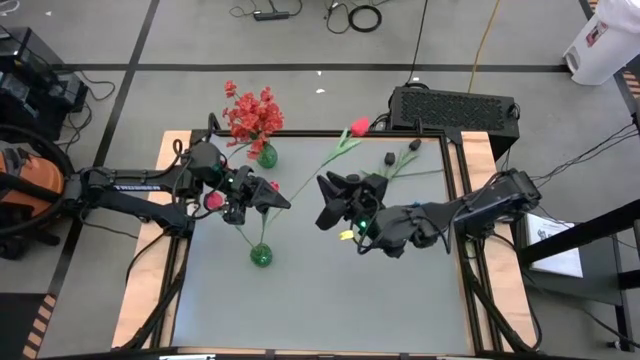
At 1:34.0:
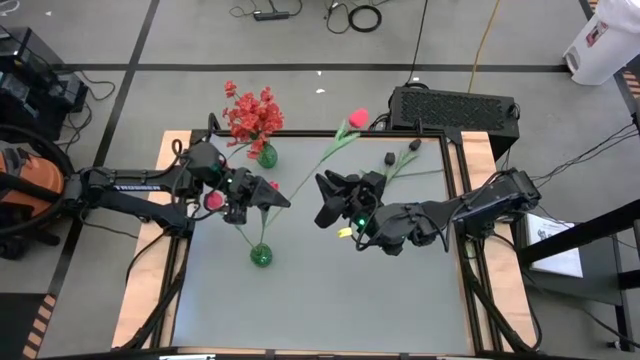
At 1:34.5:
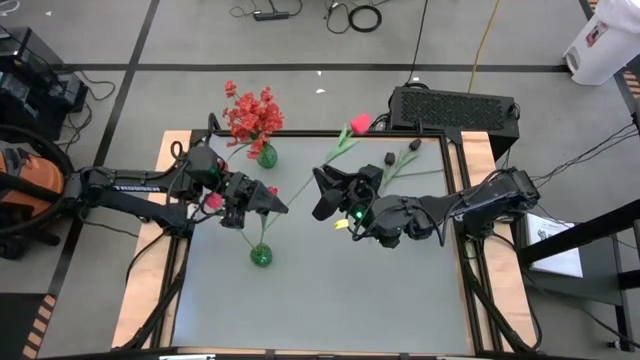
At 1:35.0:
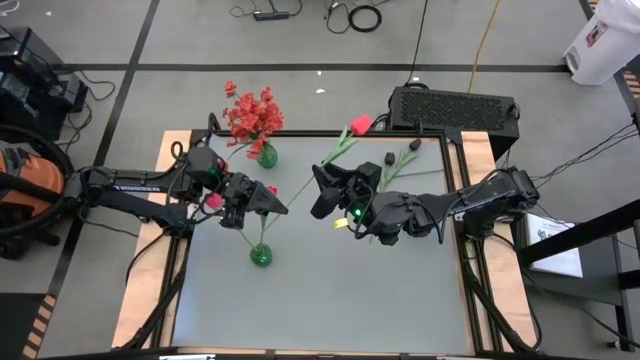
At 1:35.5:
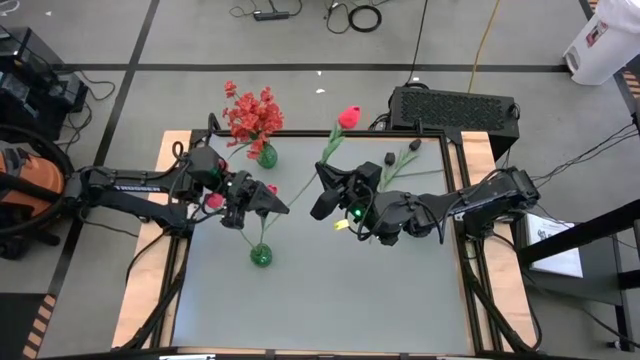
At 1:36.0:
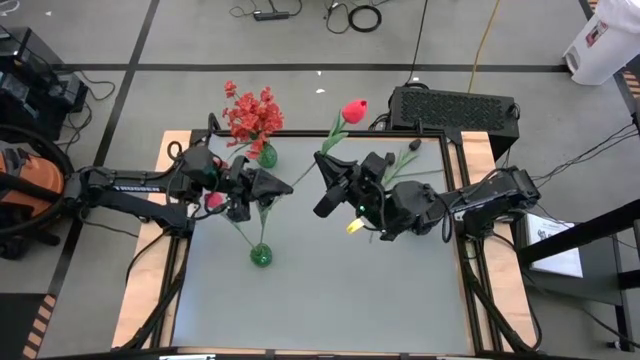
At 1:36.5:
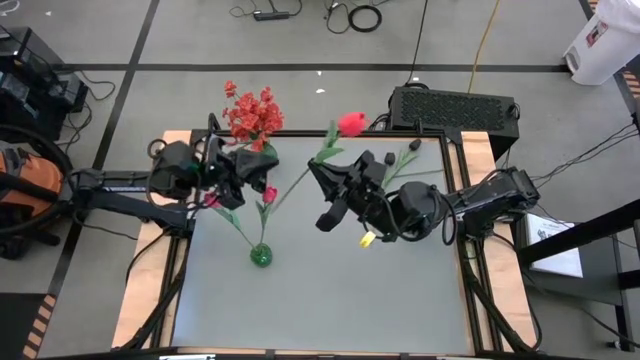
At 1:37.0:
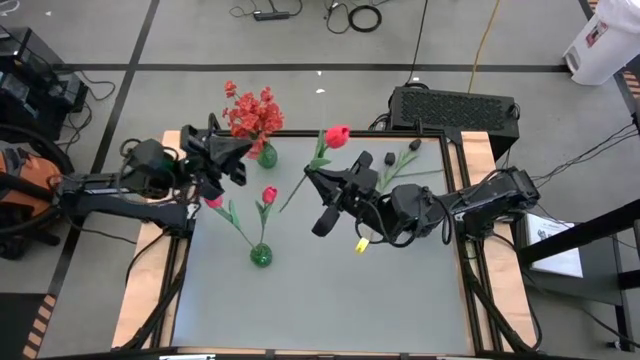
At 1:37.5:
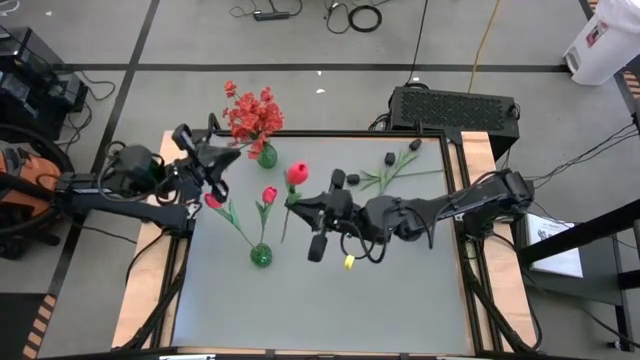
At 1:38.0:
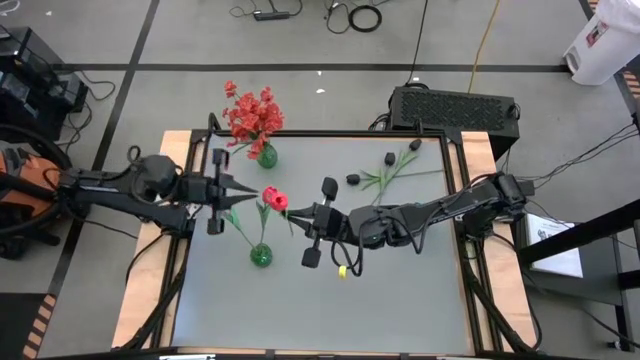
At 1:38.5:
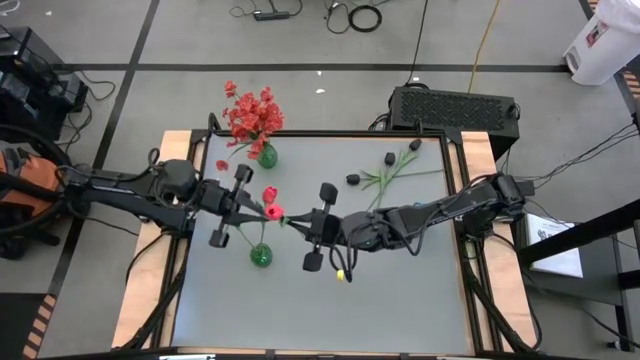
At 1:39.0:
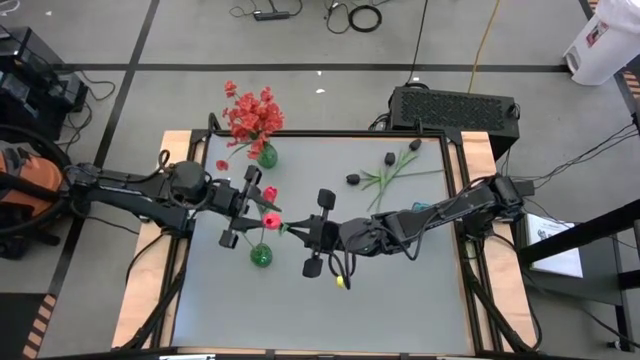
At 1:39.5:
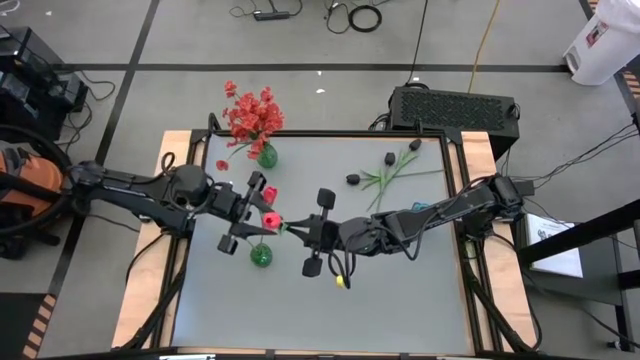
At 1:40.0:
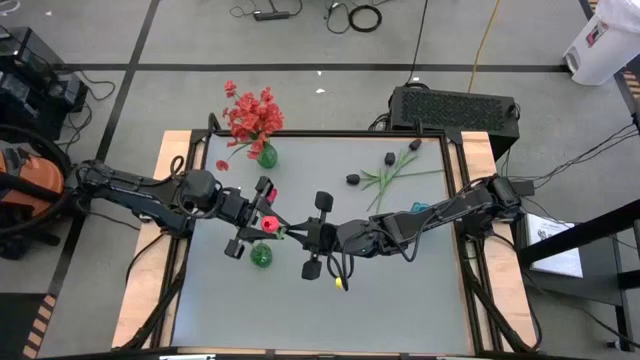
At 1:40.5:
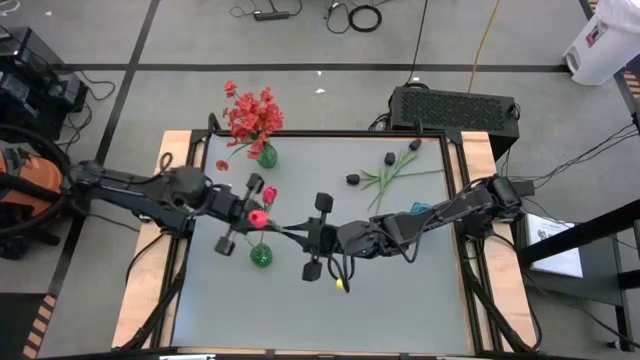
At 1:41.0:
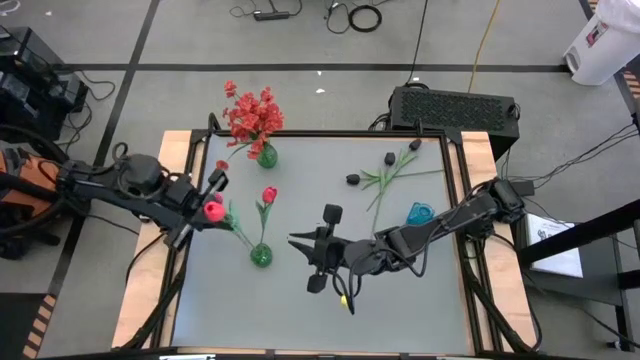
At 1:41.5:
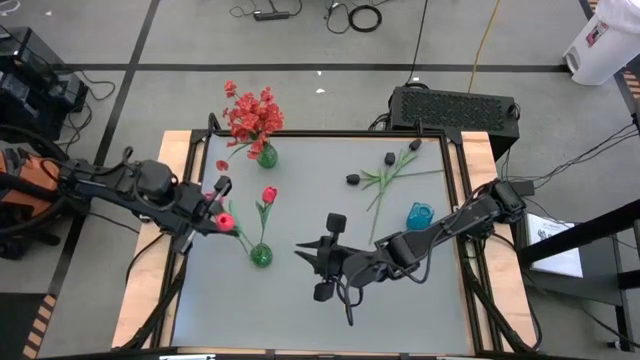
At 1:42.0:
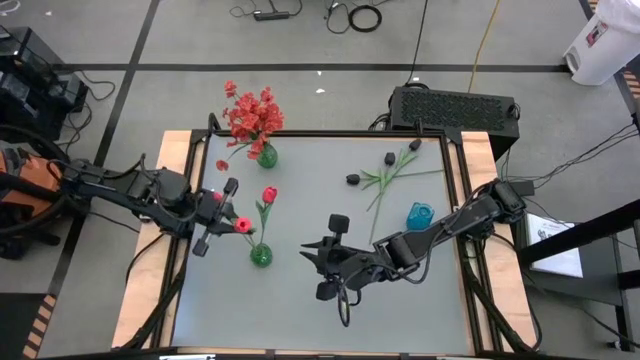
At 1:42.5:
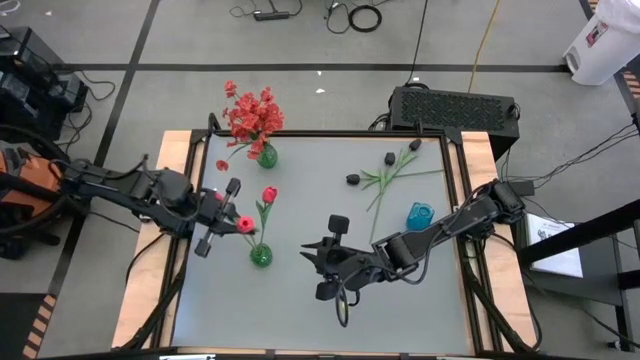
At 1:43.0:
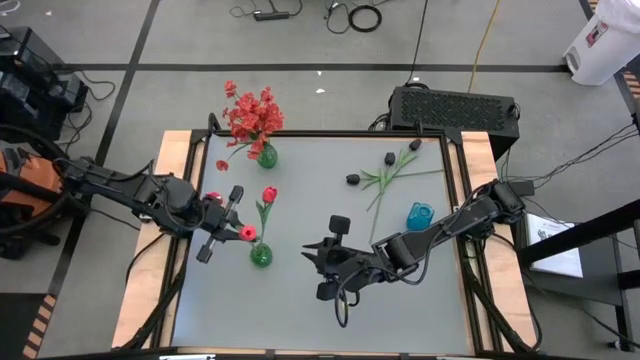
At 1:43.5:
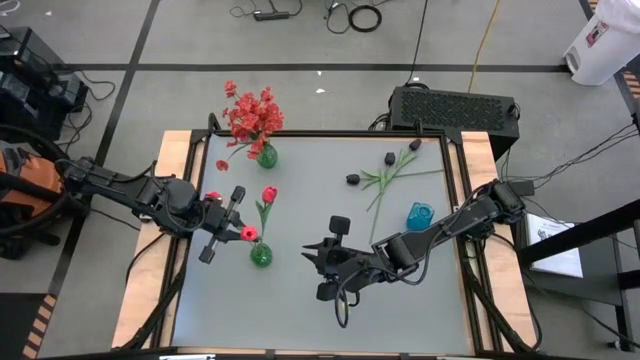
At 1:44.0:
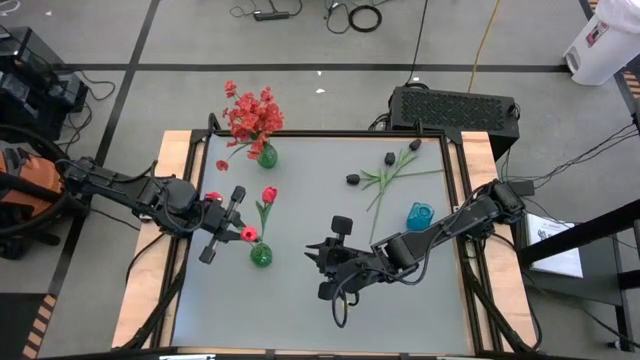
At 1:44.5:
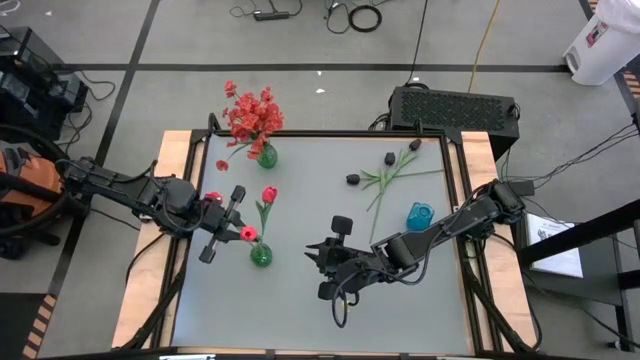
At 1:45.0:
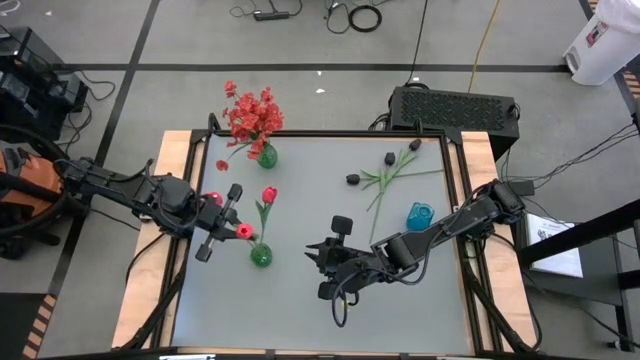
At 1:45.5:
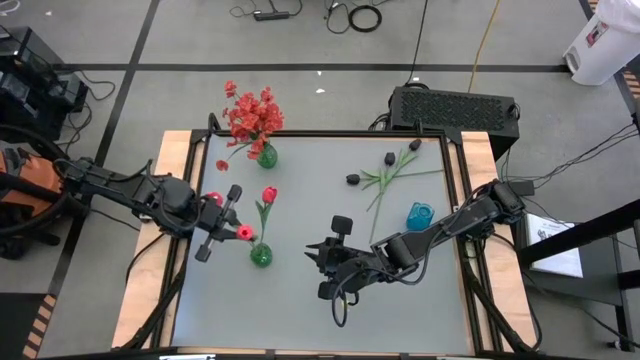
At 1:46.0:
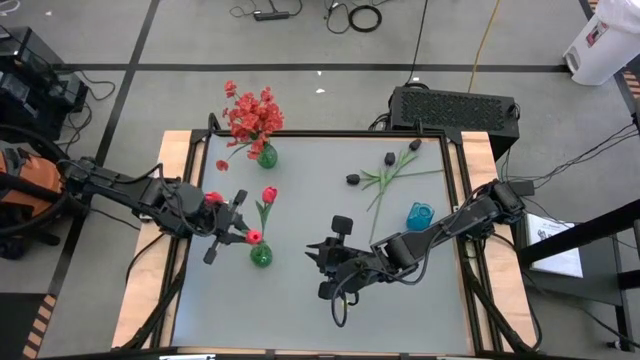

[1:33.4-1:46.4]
Task: Sort flowers into vase by color
Put the red flower into the bottom green vase

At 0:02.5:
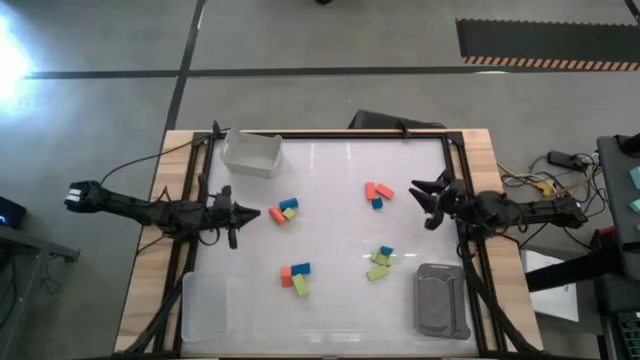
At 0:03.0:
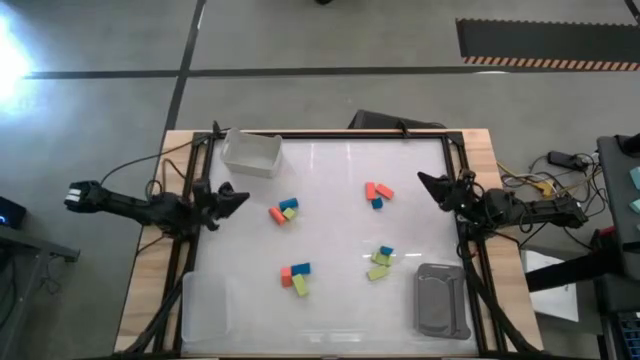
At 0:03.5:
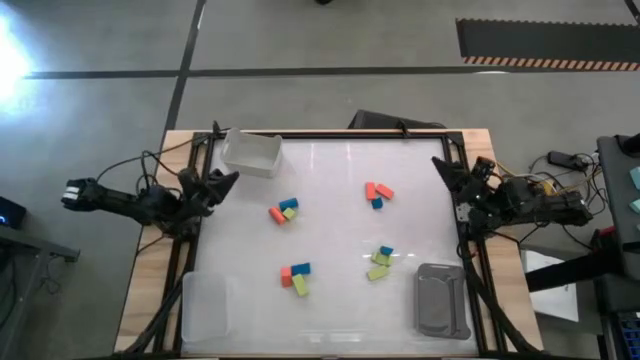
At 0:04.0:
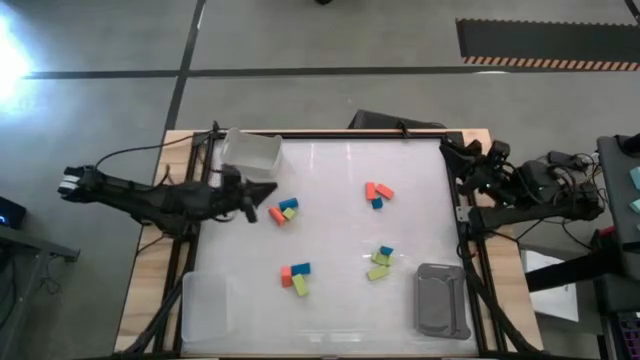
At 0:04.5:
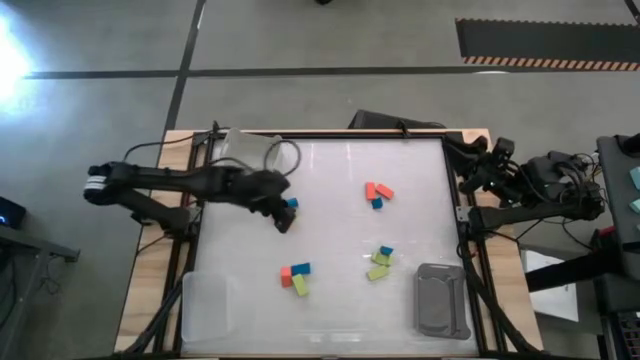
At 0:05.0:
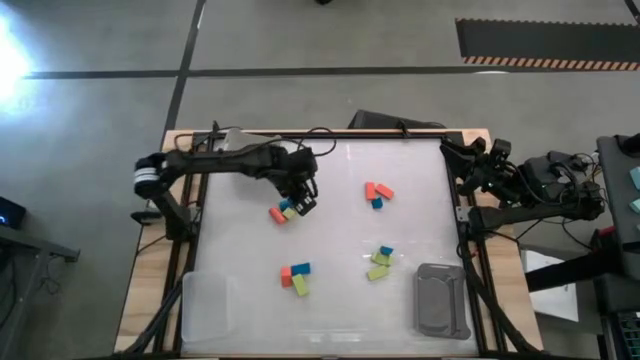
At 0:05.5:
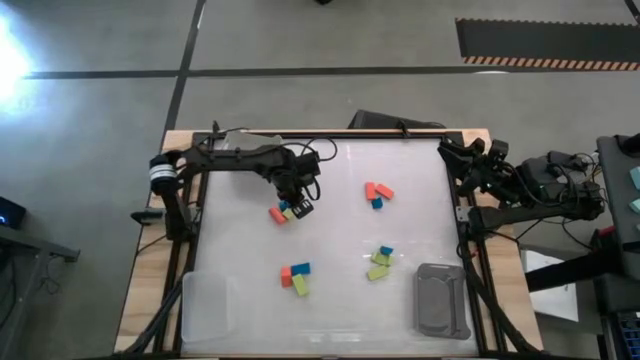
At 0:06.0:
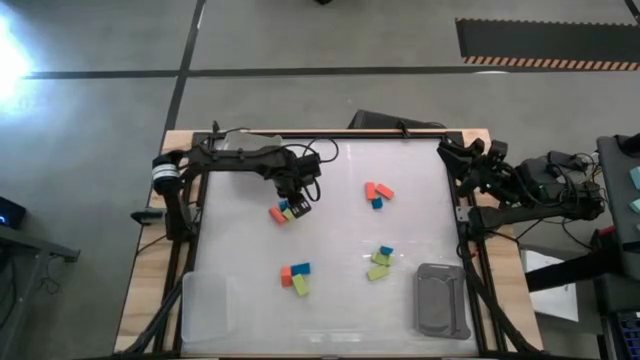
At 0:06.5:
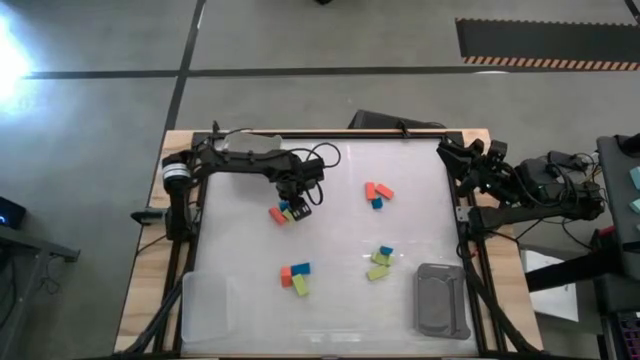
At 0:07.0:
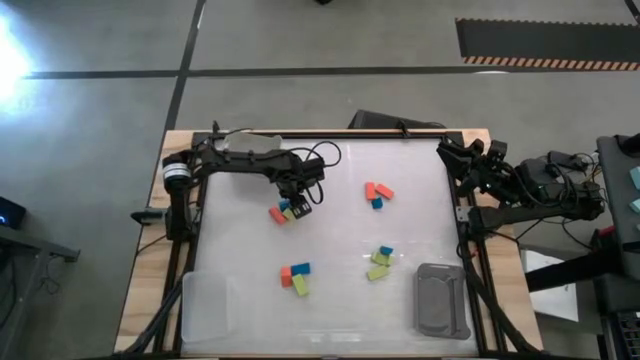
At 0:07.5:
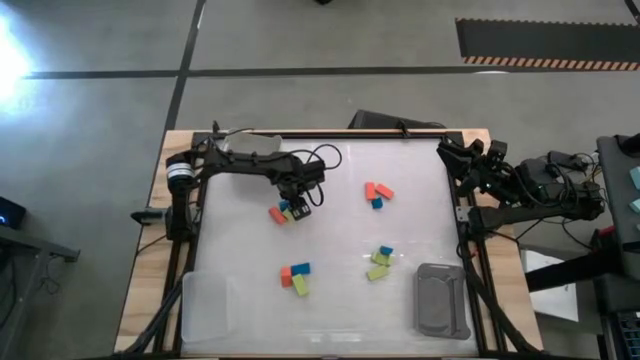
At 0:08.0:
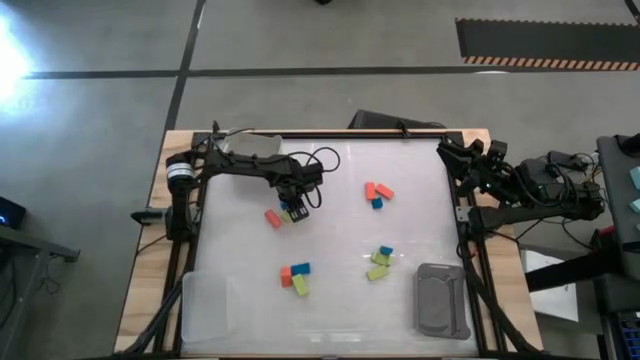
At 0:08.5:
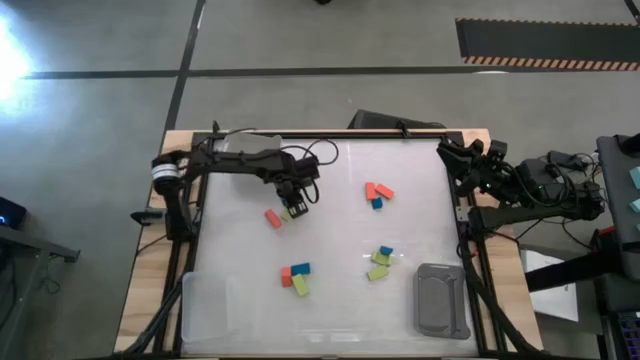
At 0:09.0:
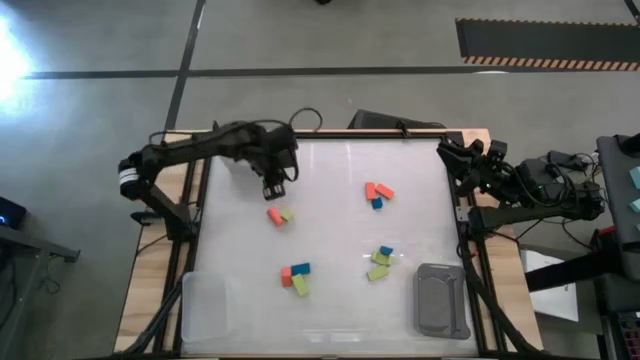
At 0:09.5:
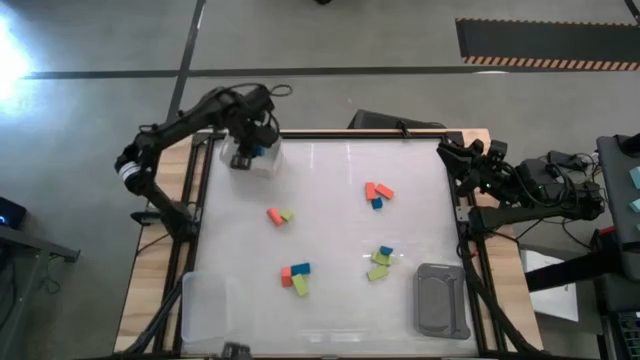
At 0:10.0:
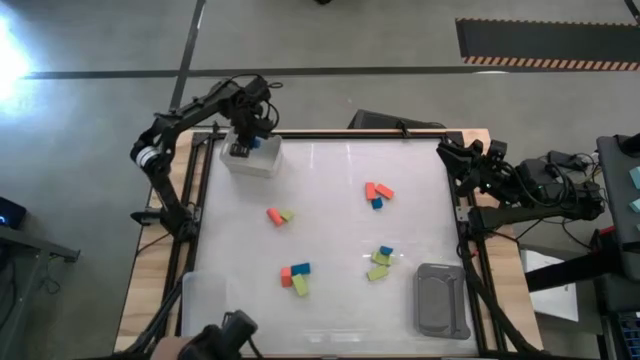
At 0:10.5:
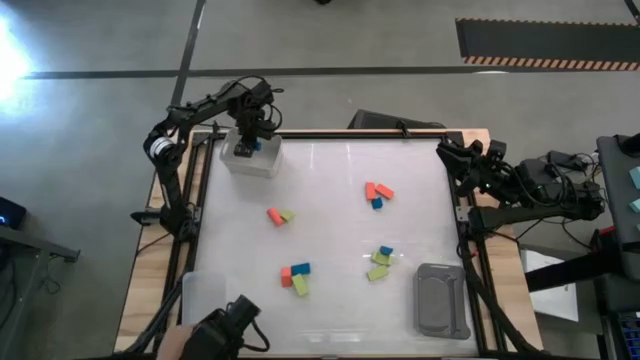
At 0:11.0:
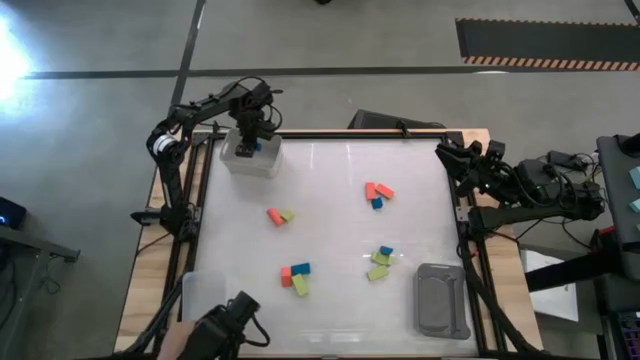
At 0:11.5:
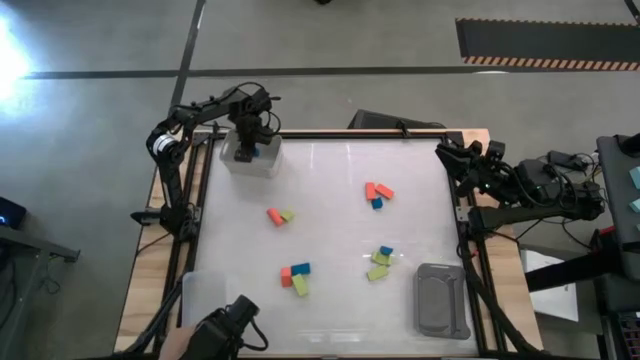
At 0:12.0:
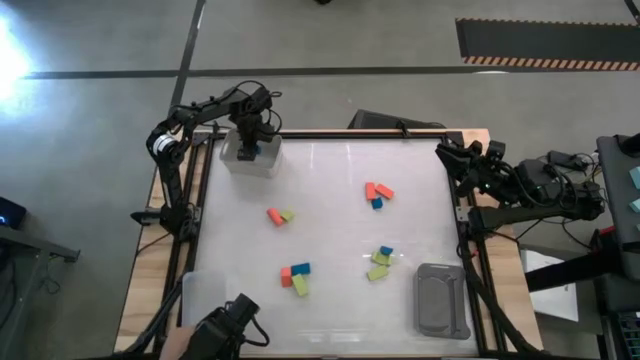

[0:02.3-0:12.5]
Task: Sort & place blocks by color
Put the blue block into the white bin
